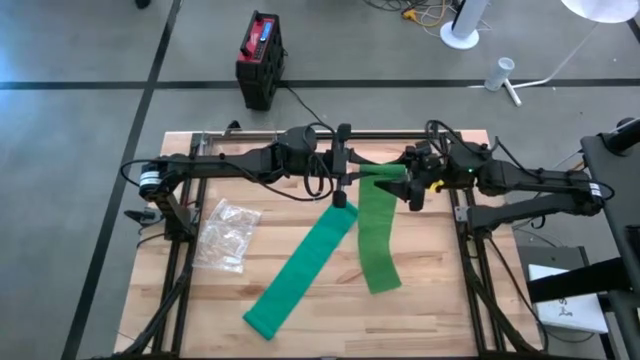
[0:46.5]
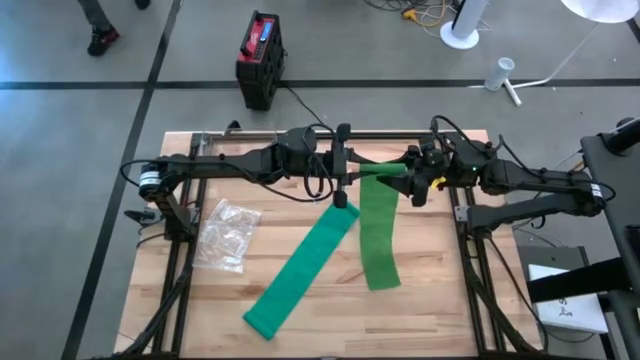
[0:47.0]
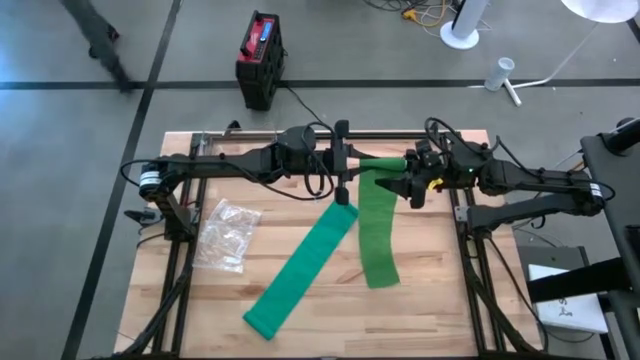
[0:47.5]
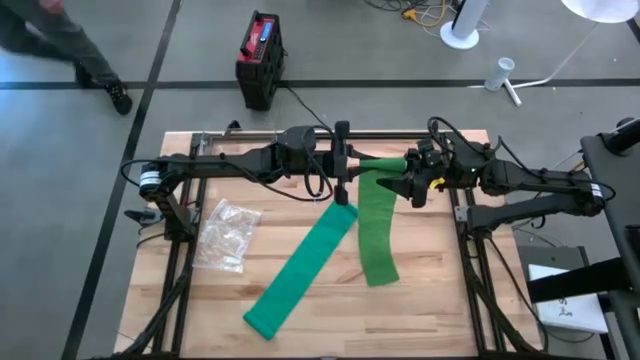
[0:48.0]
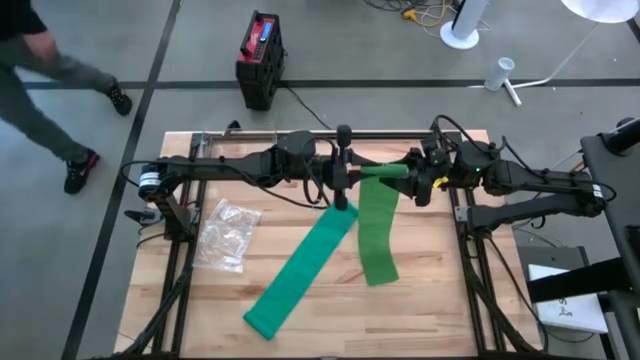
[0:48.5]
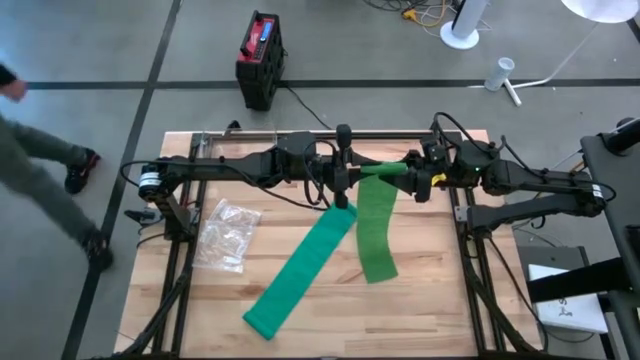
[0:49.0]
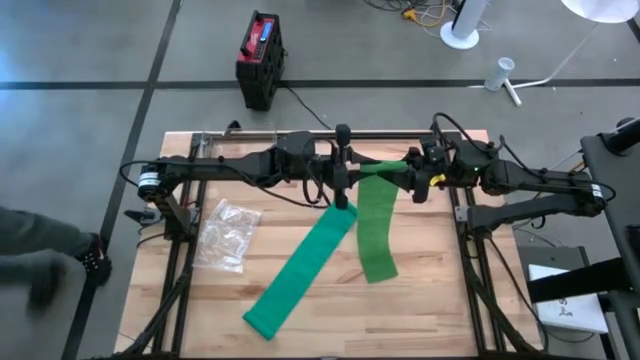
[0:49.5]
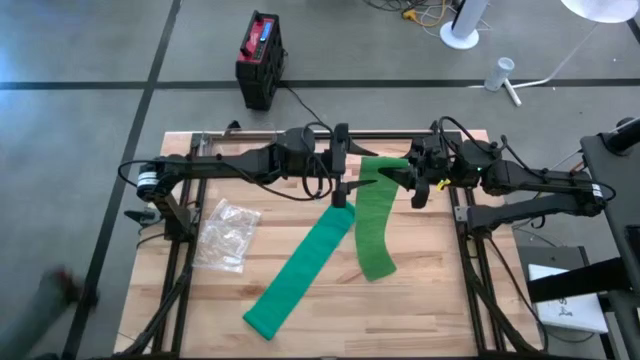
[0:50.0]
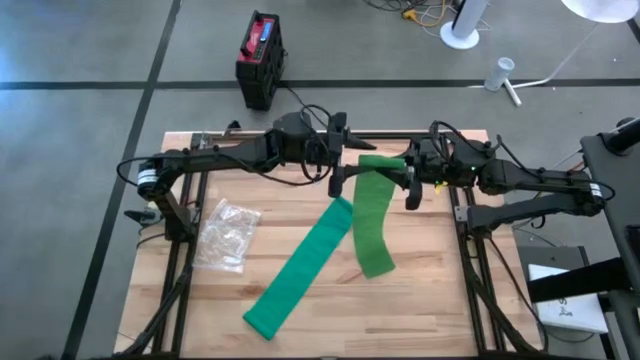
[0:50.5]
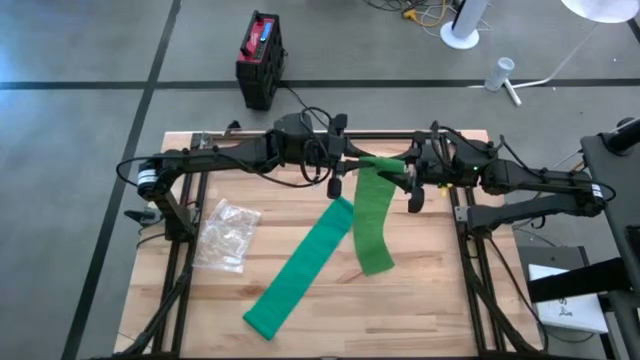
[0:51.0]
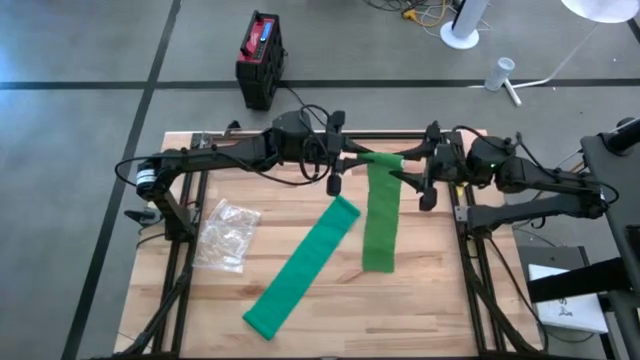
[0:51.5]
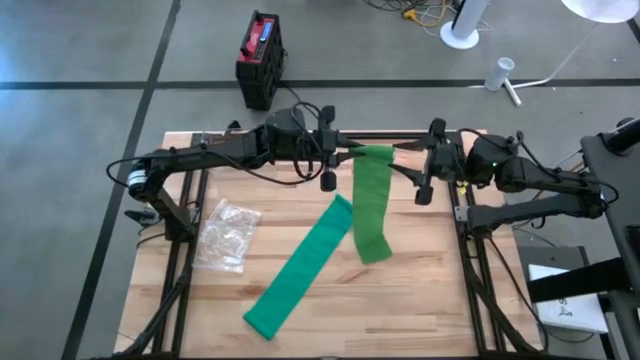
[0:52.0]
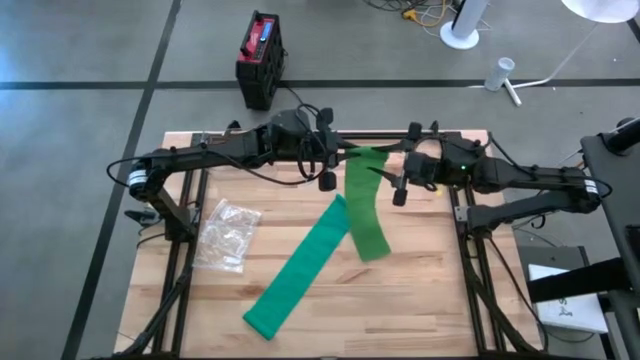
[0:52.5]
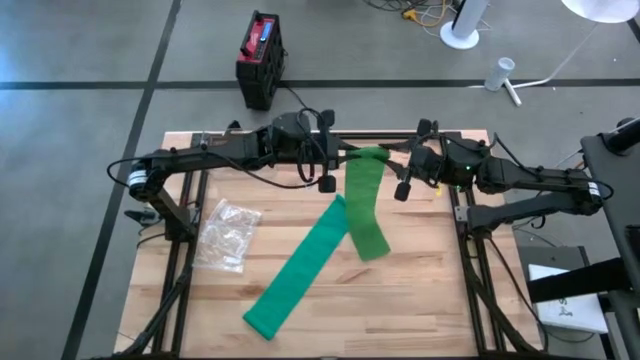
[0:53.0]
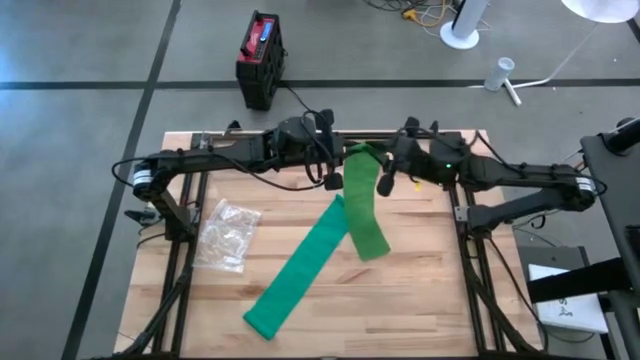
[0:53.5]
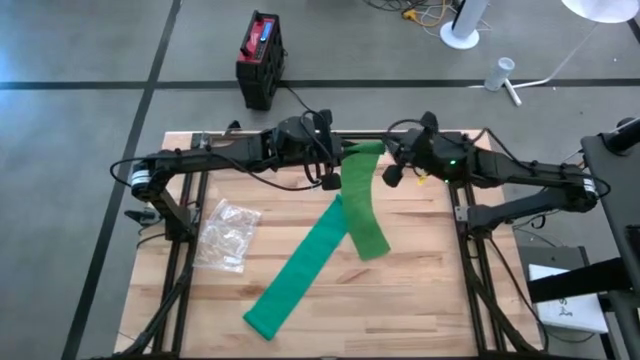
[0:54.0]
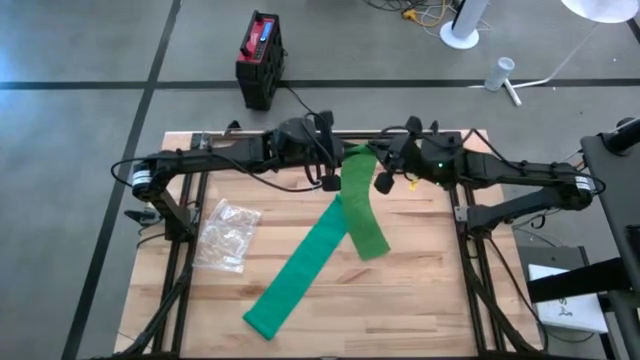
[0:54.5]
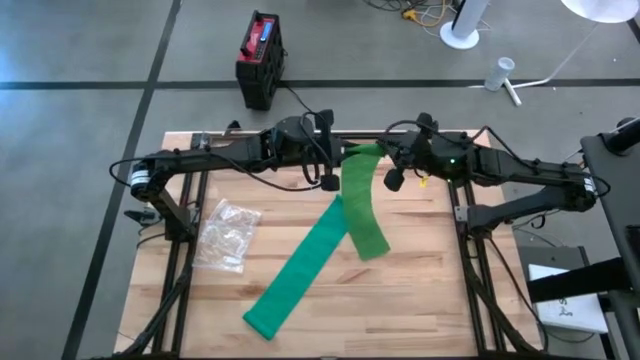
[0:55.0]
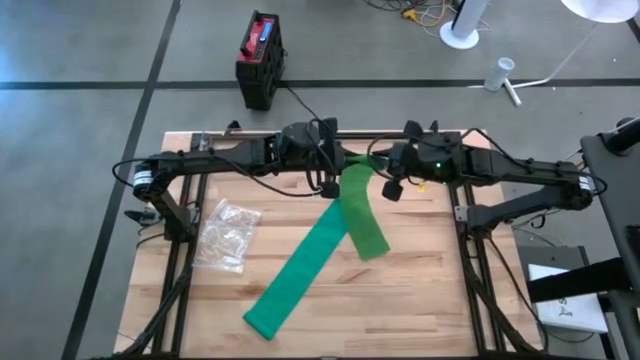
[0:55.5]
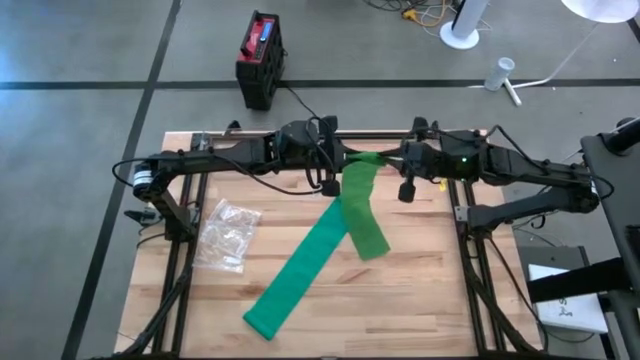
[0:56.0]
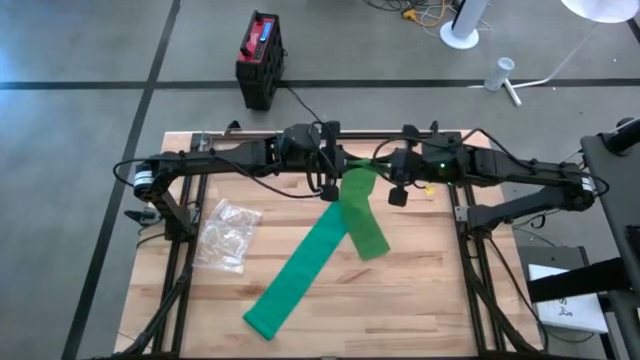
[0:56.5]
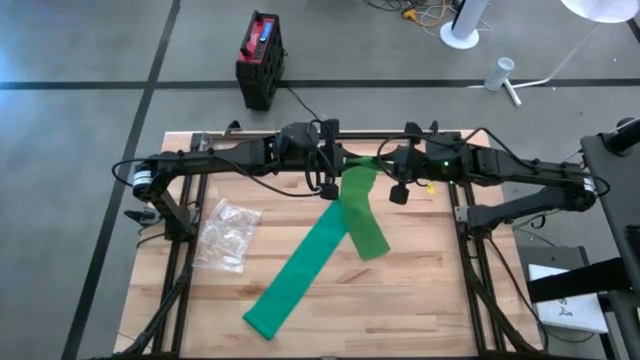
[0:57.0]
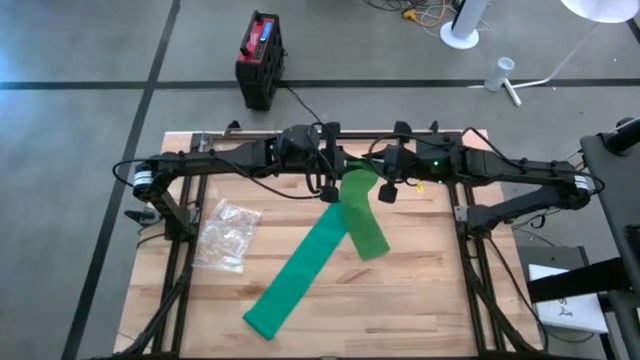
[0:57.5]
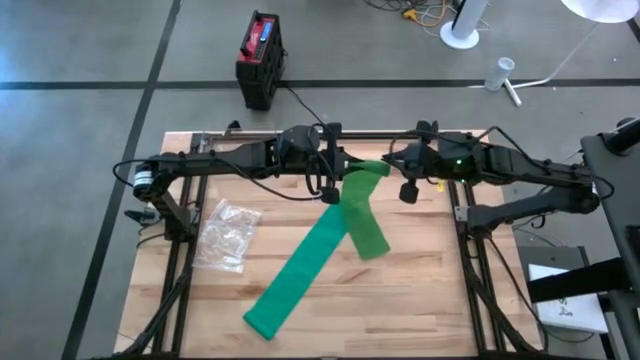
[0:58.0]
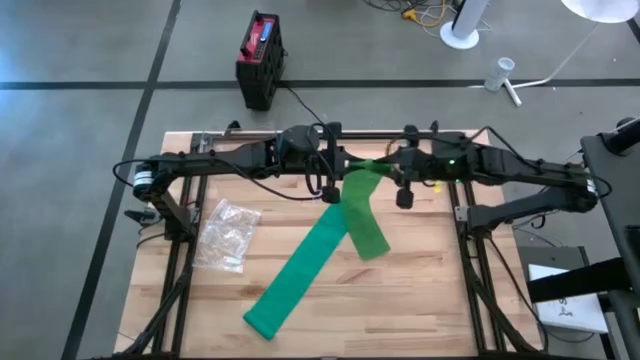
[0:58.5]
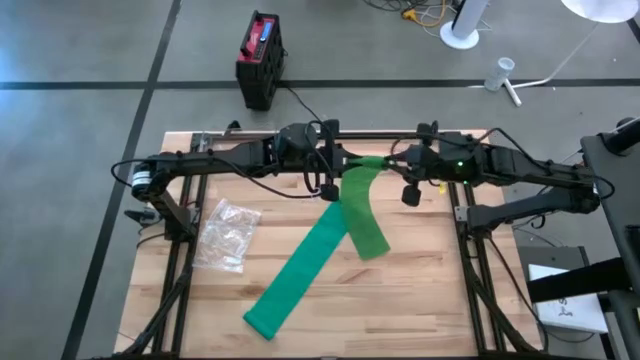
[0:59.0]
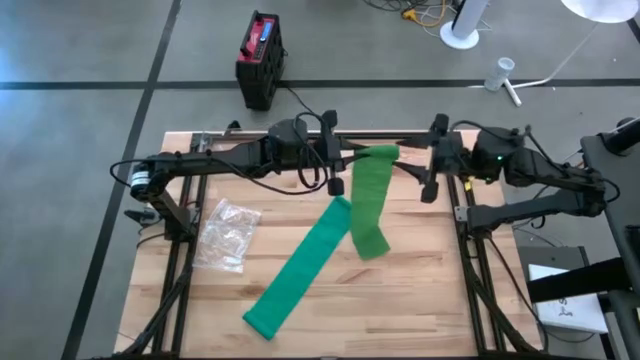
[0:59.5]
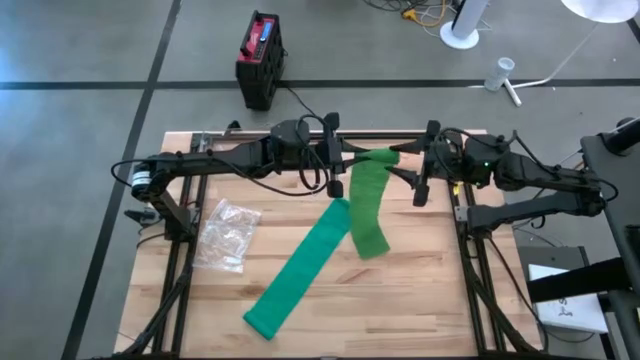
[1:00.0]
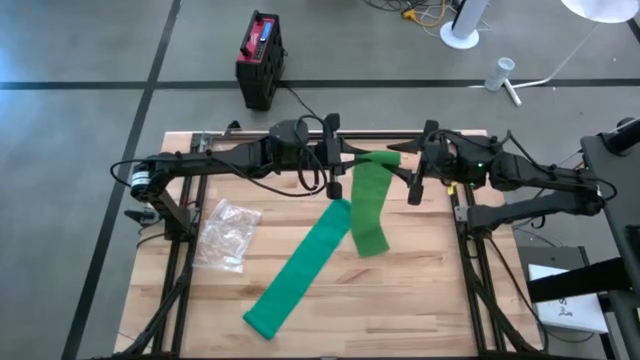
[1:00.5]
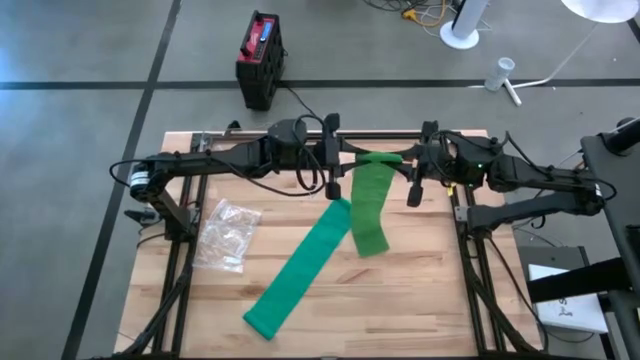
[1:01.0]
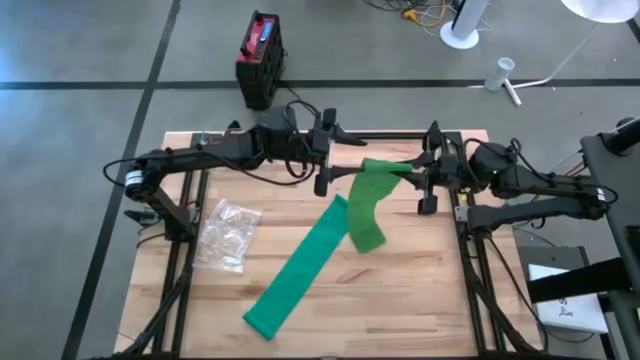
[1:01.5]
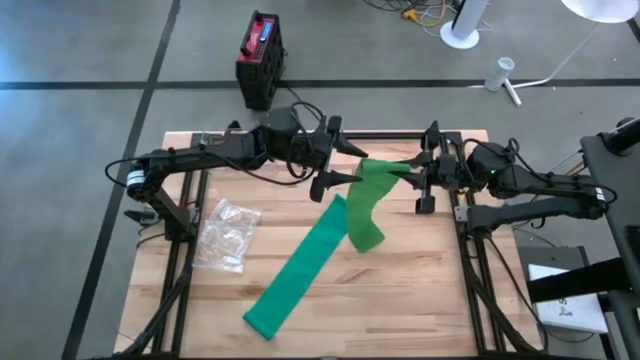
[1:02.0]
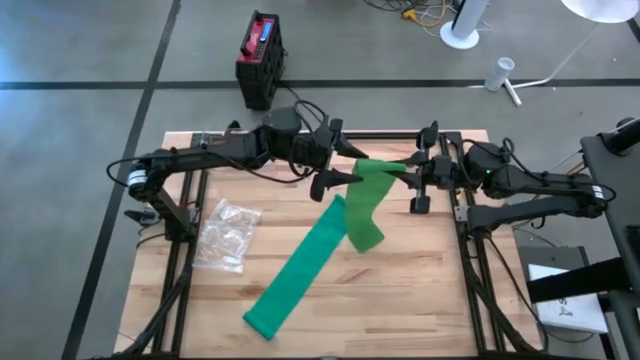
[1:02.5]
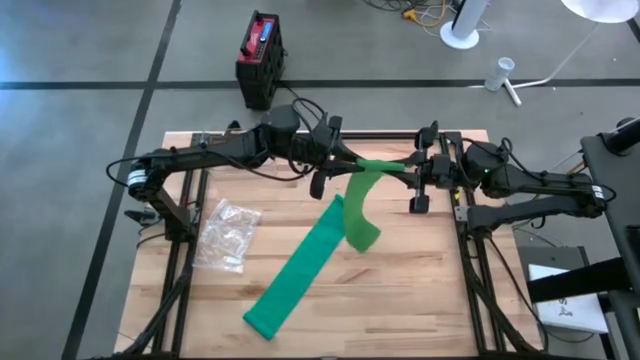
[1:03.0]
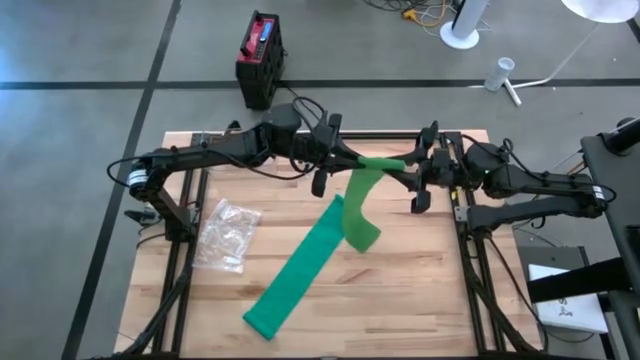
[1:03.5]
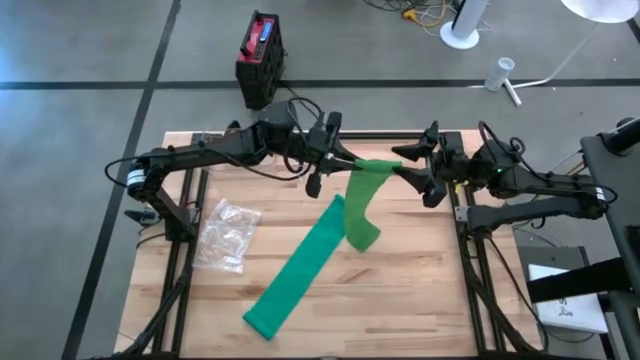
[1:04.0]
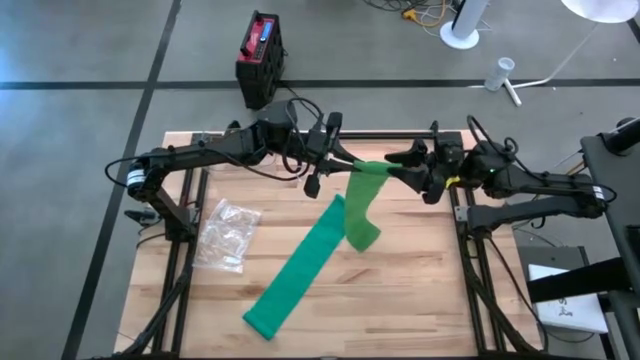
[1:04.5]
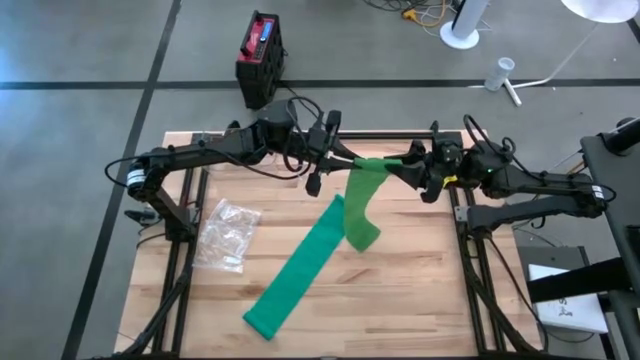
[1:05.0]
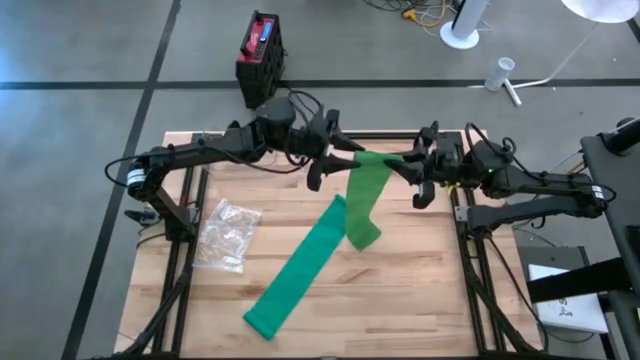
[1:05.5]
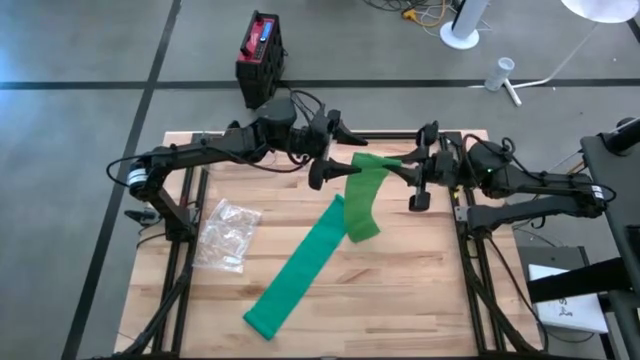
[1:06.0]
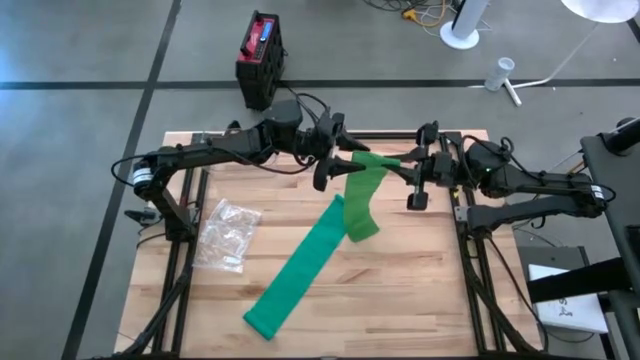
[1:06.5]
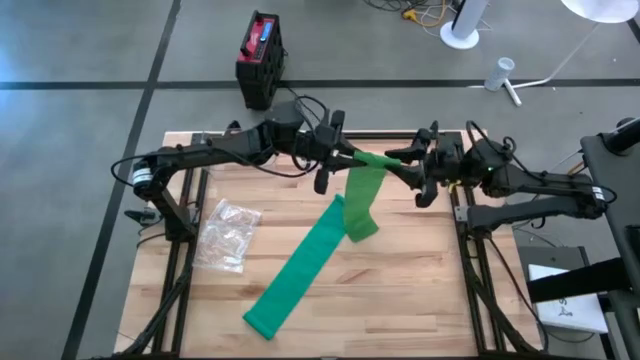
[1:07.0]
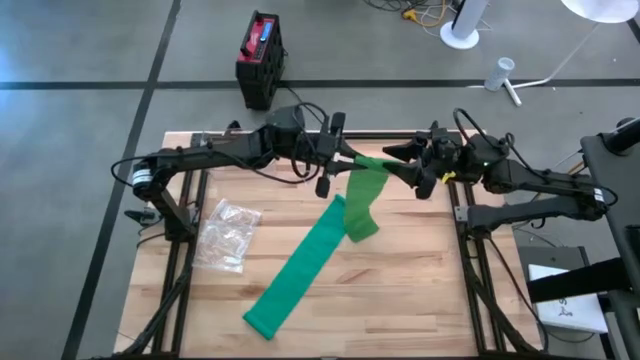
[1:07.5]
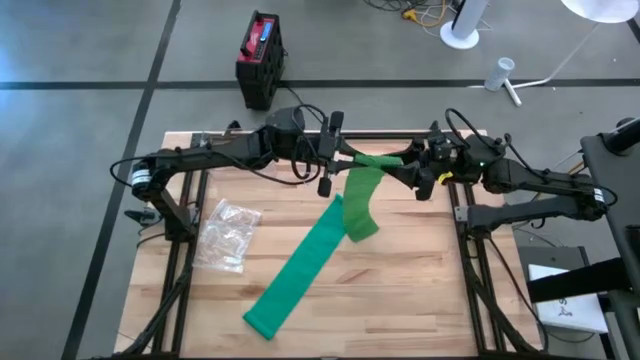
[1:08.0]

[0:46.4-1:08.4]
Task: Roll bandage
Roll the green bandage
